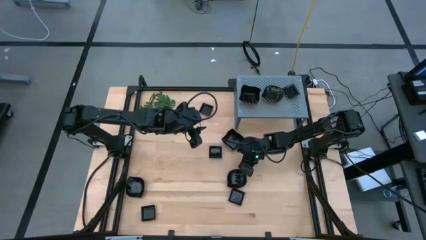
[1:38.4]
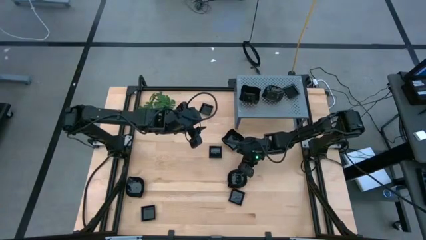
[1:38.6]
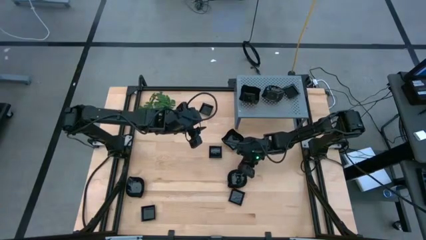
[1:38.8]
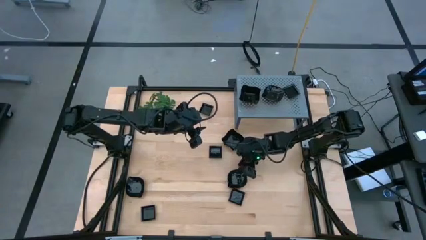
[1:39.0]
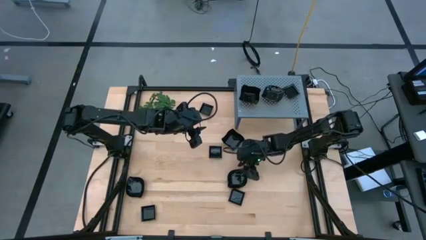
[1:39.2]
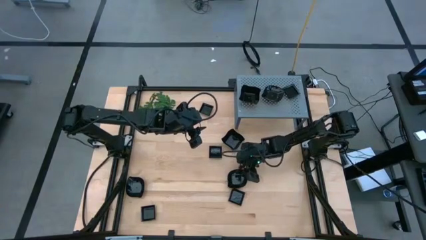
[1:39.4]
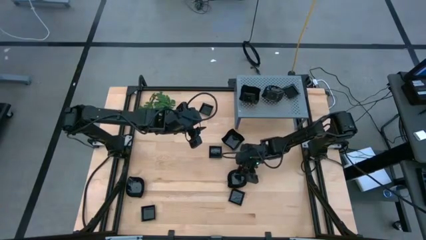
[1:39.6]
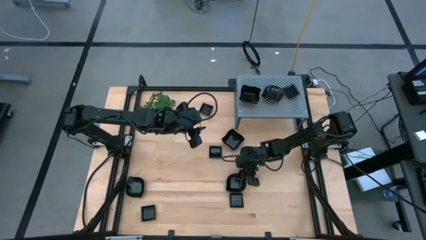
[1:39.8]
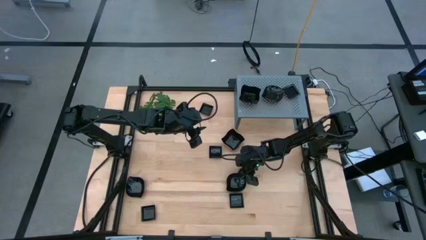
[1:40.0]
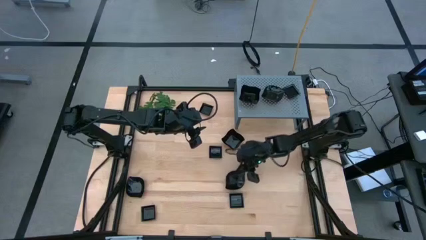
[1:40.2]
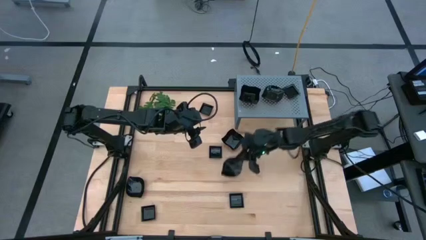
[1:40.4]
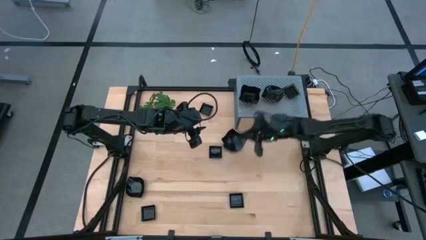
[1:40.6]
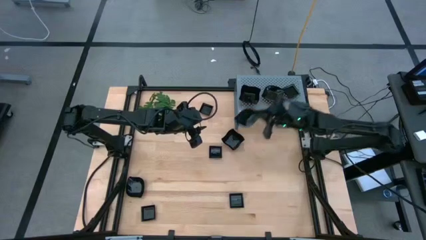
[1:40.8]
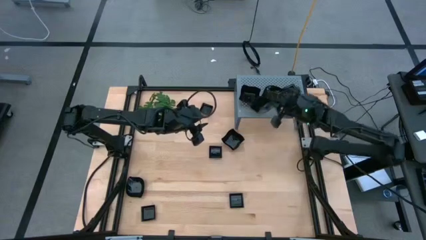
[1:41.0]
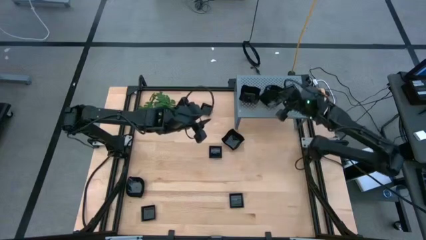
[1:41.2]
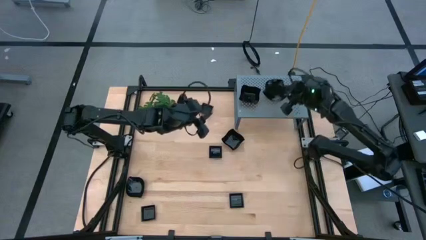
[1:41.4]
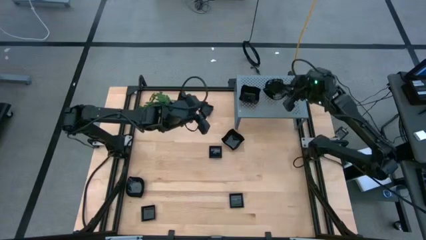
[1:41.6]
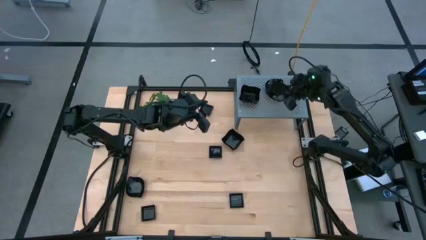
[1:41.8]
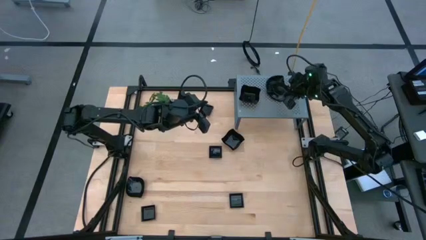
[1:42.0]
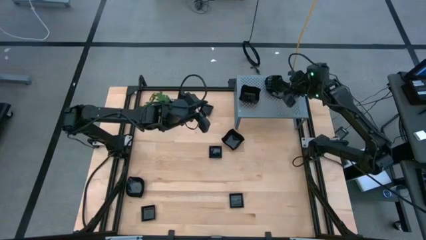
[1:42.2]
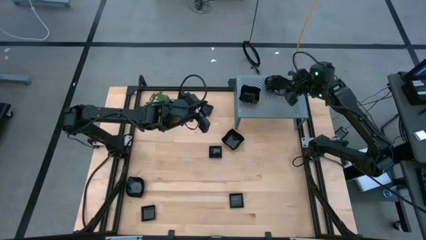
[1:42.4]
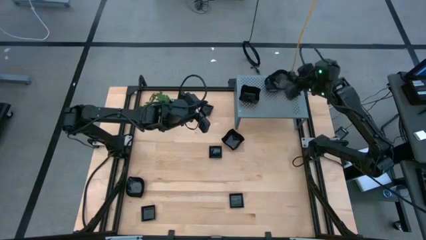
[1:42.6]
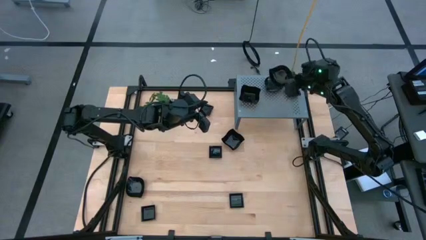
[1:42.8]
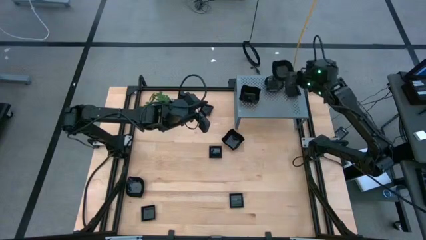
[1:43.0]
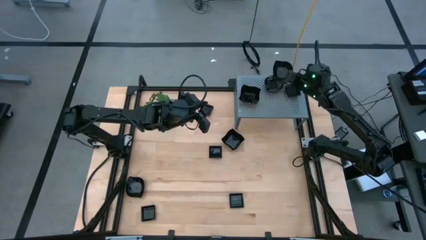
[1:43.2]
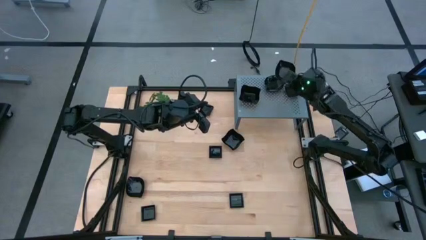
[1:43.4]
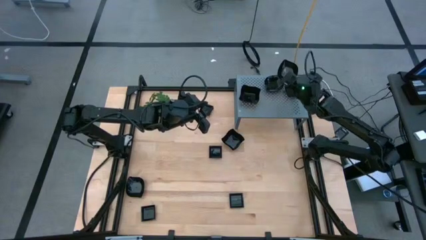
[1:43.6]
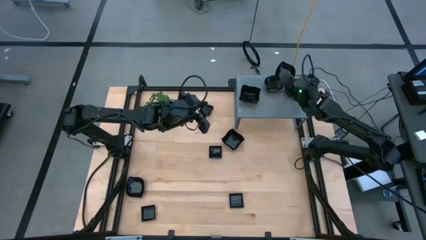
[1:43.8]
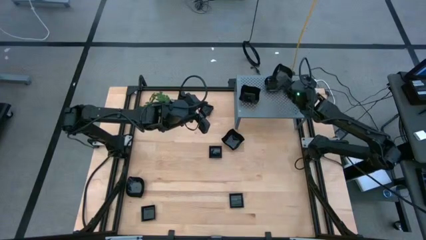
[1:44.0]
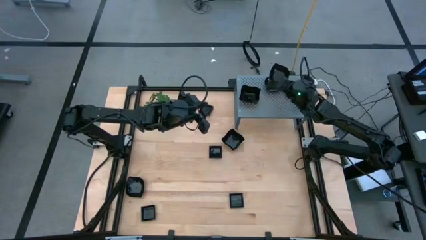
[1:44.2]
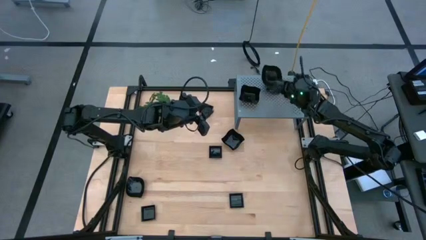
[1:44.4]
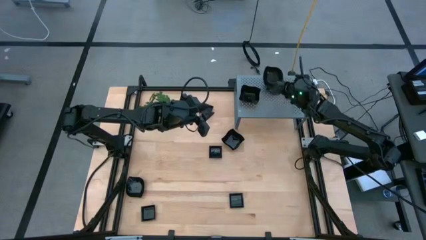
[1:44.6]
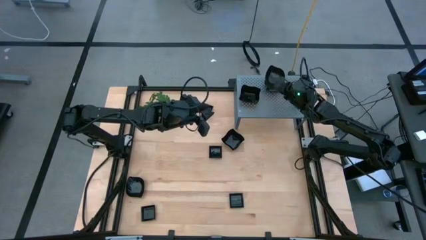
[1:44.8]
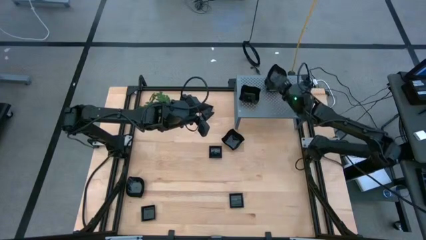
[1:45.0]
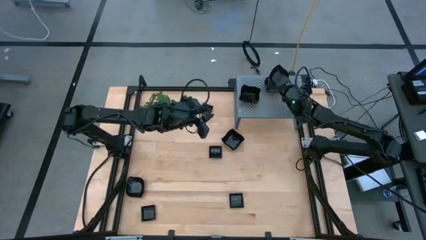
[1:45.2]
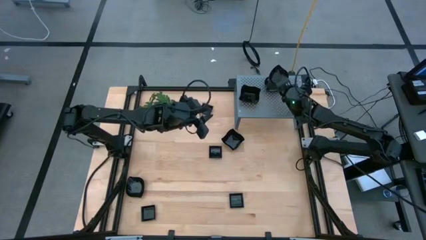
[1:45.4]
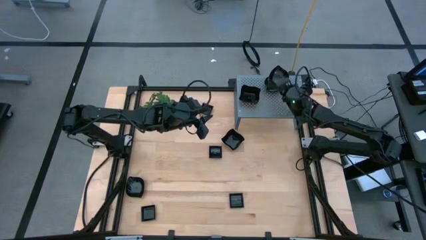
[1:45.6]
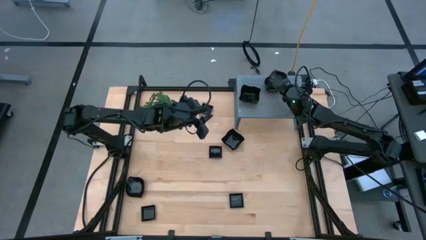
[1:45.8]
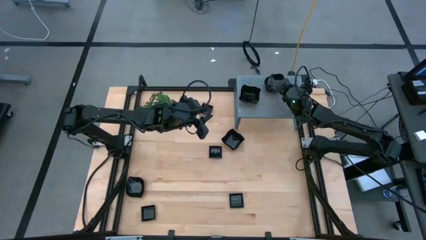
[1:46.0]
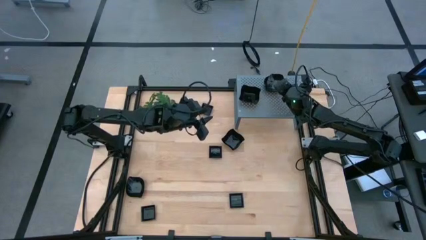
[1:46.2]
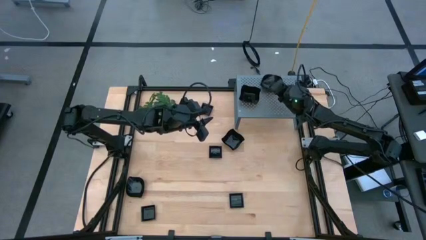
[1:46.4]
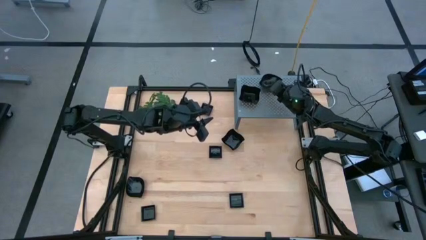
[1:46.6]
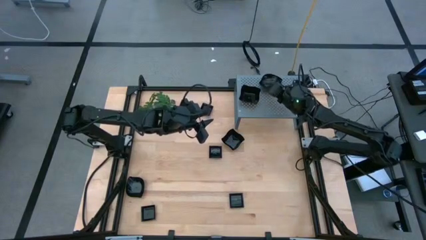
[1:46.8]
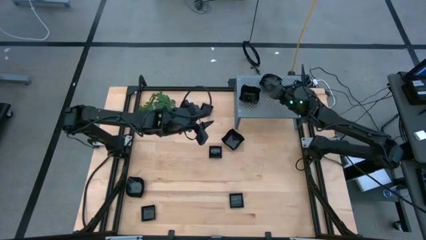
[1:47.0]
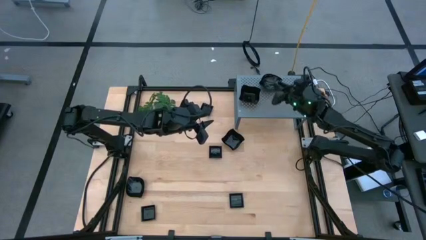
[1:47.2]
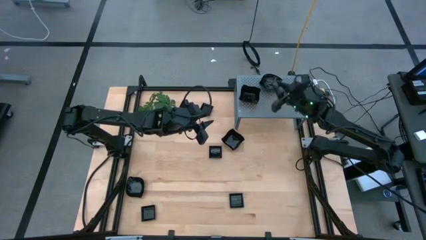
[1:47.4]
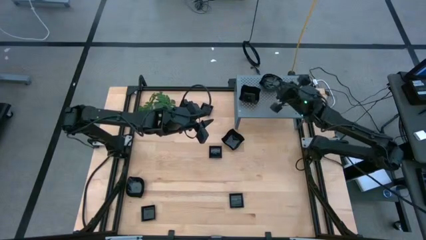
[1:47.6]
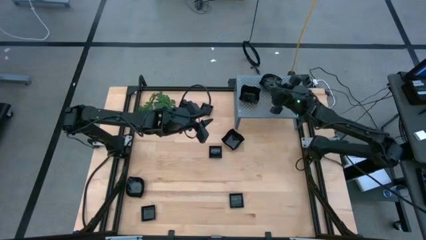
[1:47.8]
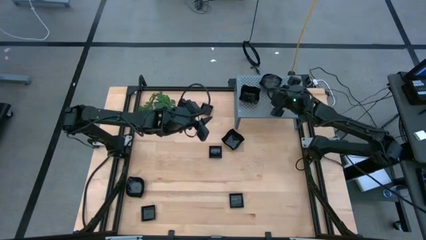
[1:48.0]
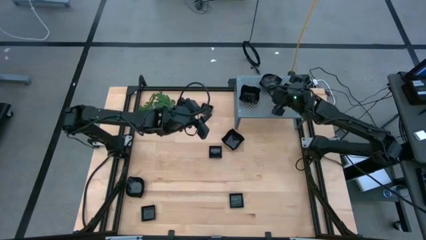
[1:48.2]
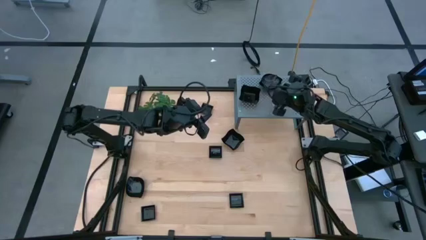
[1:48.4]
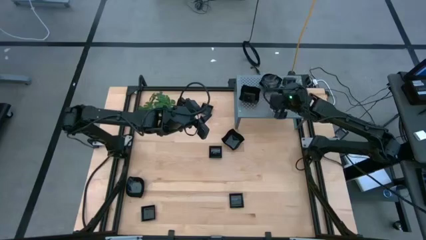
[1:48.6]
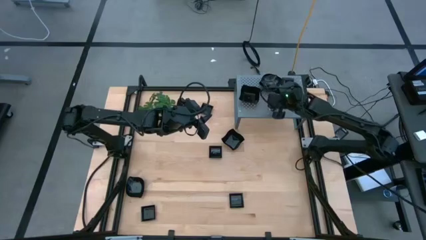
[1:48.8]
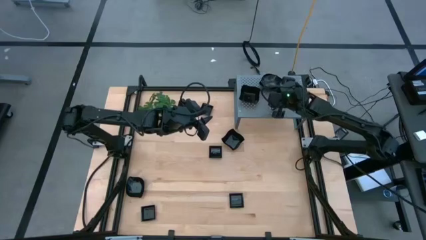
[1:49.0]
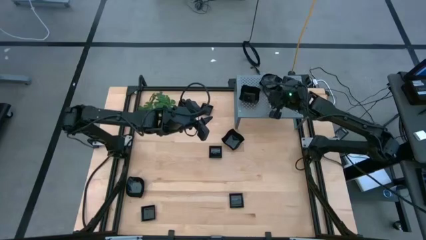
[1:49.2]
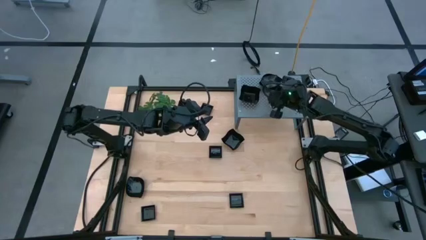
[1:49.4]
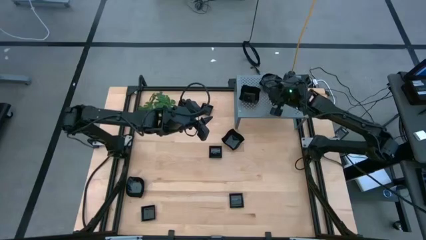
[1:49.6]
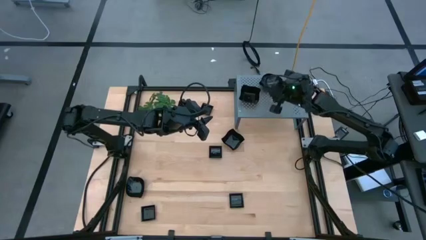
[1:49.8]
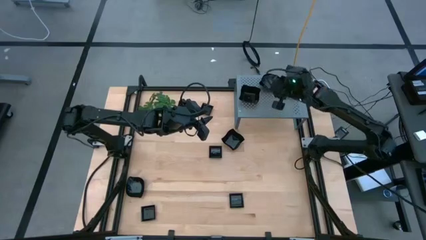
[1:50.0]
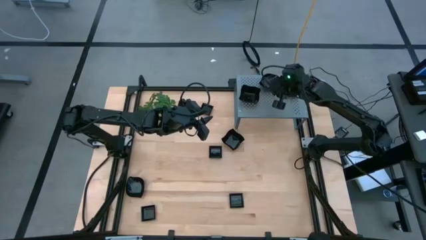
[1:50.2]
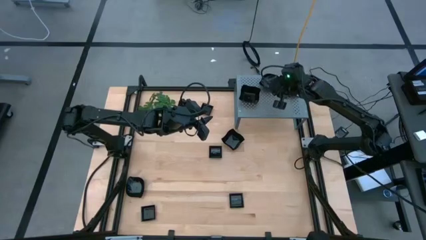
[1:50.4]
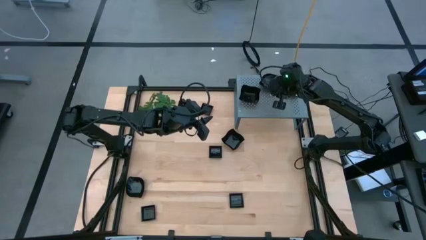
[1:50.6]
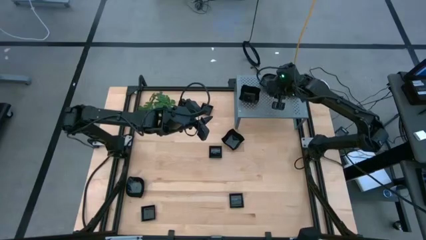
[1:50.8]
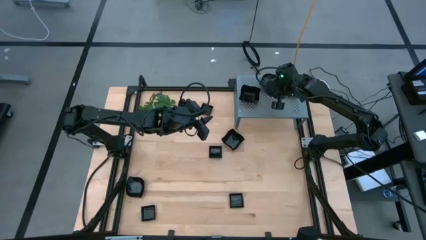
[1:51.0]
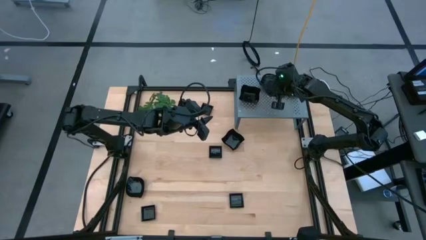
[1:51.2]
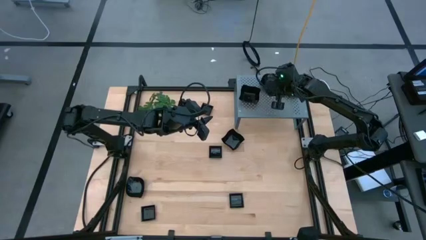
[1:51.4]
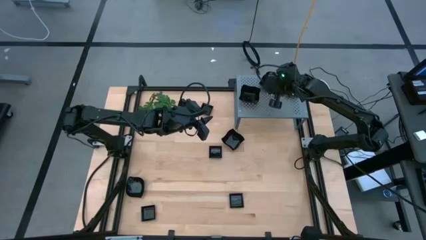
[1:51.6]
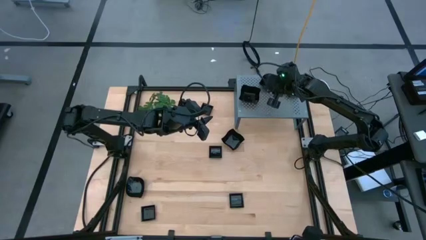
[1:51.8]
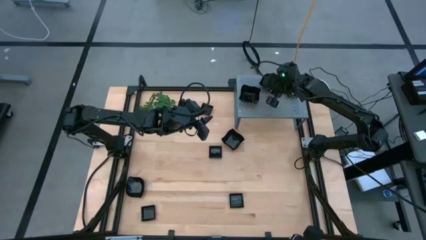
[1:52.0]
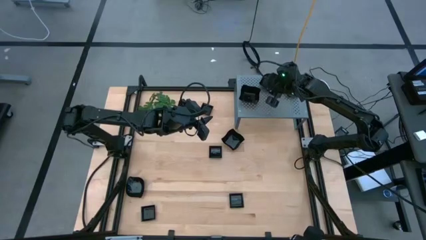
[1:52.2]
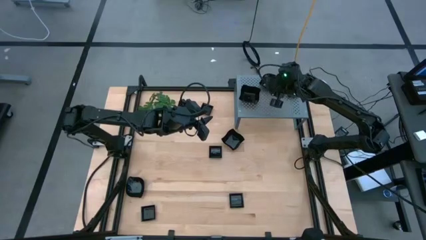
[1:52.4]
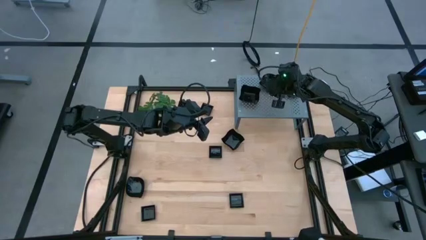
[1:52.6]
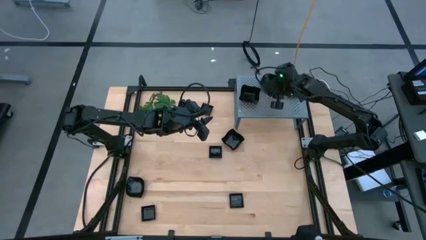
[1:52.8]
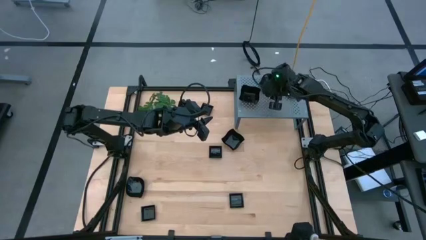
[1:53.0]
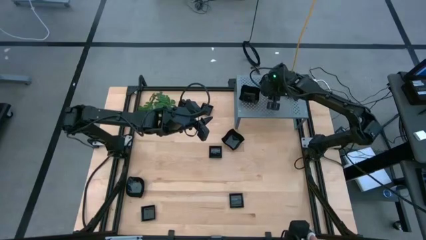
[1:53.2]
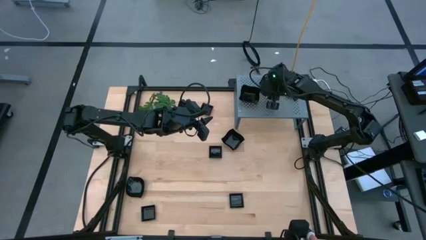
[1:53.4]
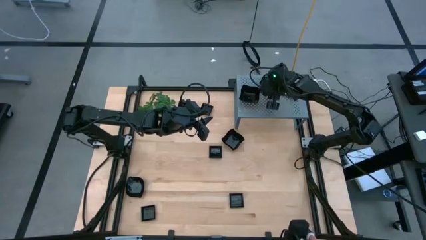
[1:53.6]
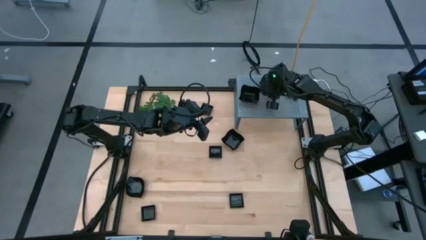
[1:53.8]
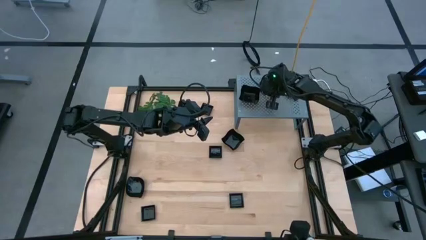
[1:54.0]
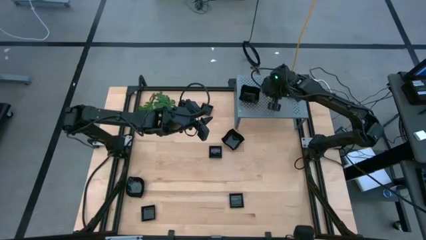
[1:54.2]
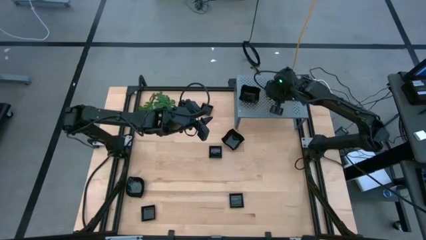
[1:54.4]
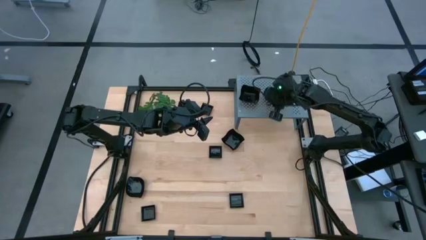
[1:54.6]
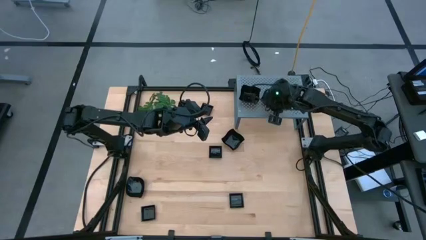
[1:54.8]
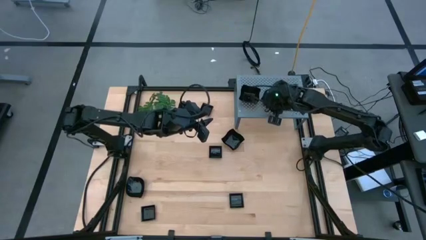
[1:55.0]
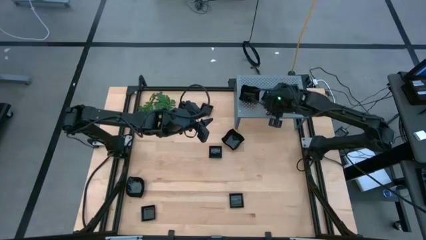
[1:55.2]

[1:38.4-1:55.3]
Task: Pick & Place Mini shaped plates
Stack the leaf shaped plate on top of the leaf shaped plates on the shelf
